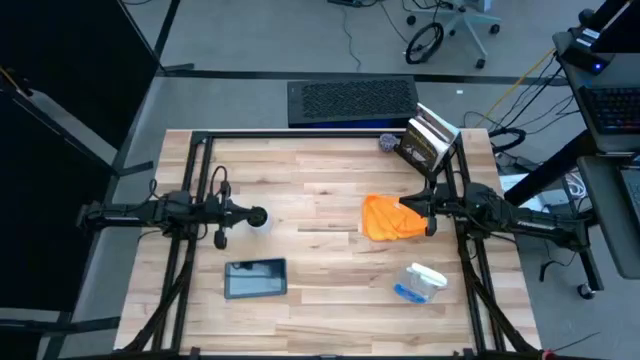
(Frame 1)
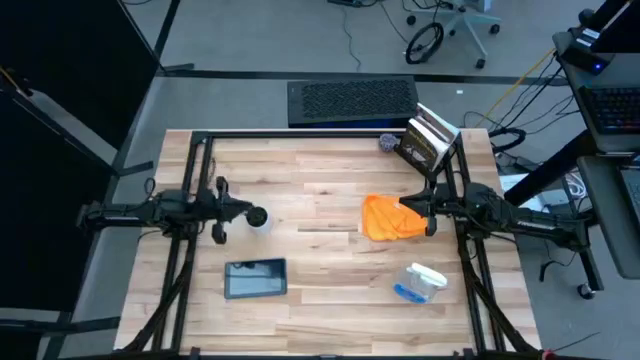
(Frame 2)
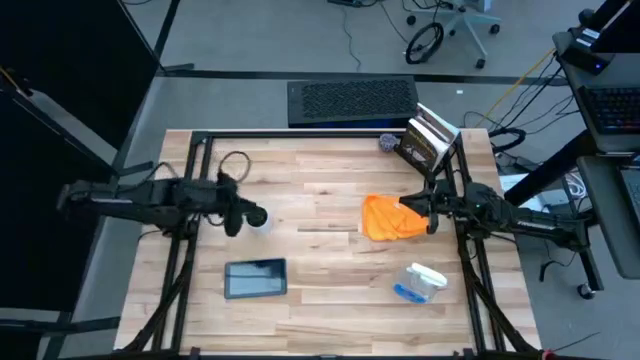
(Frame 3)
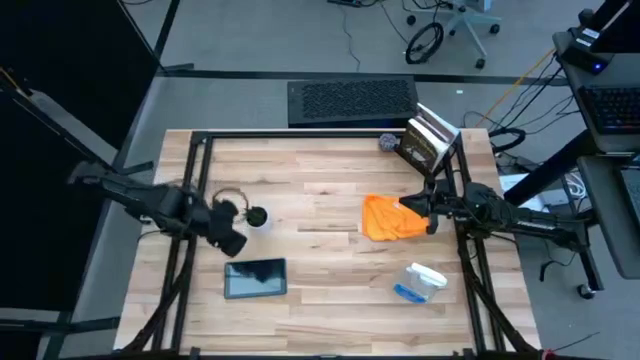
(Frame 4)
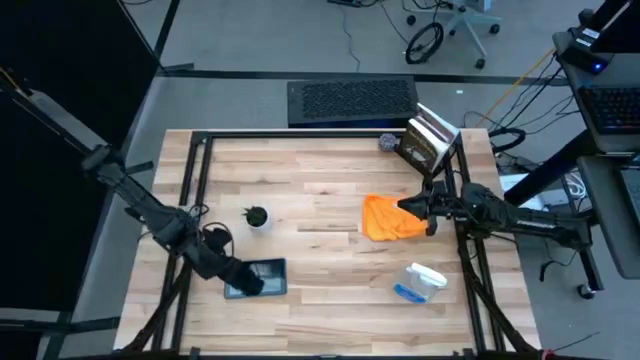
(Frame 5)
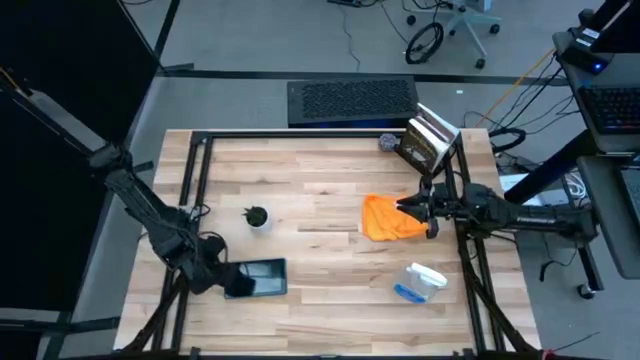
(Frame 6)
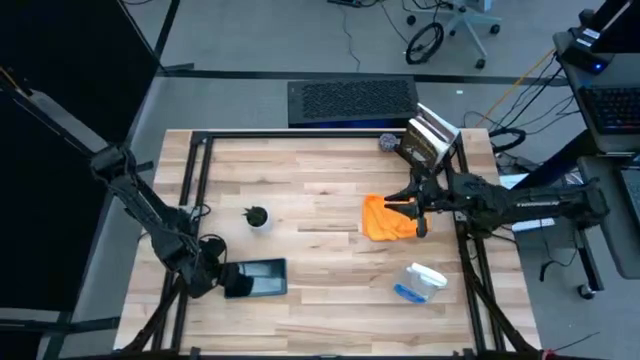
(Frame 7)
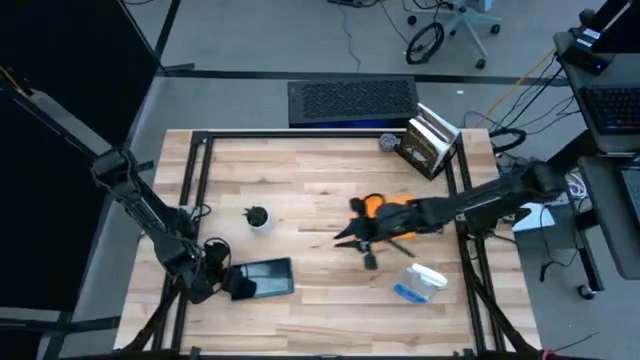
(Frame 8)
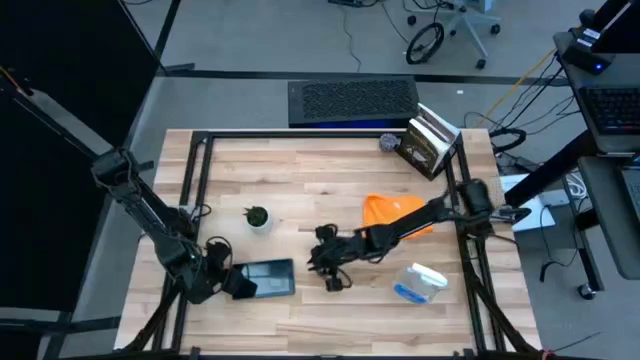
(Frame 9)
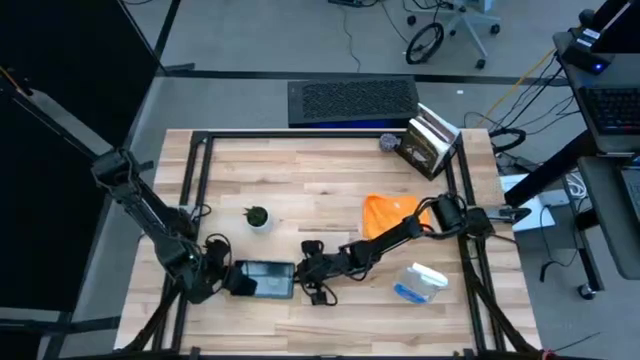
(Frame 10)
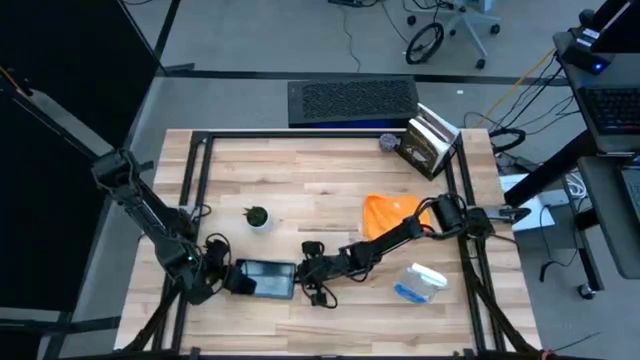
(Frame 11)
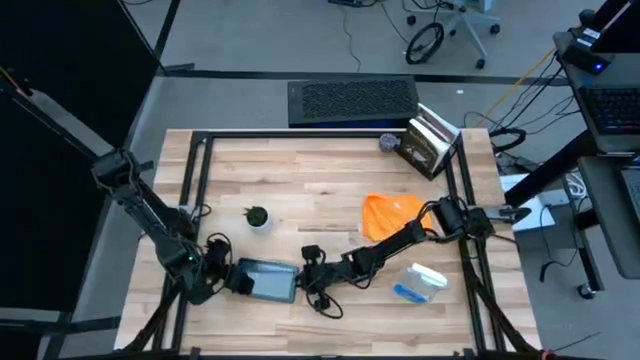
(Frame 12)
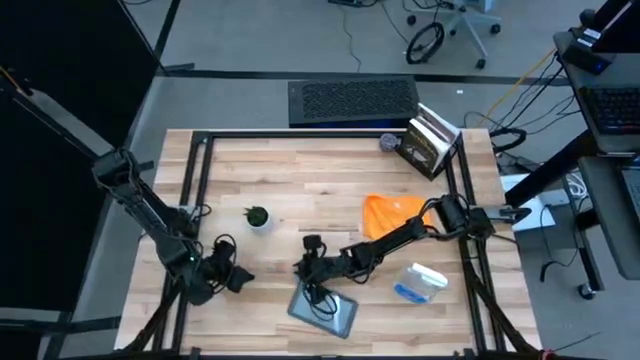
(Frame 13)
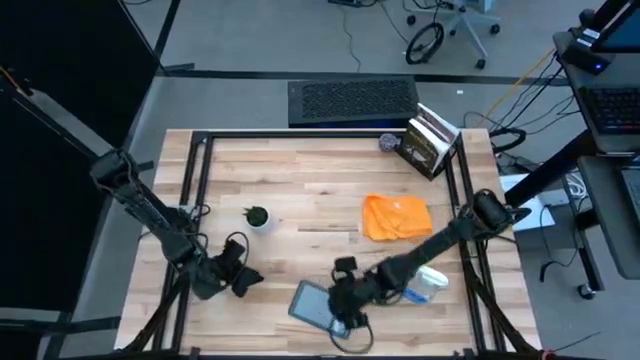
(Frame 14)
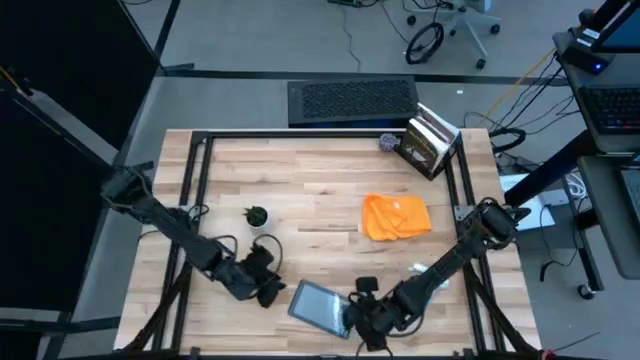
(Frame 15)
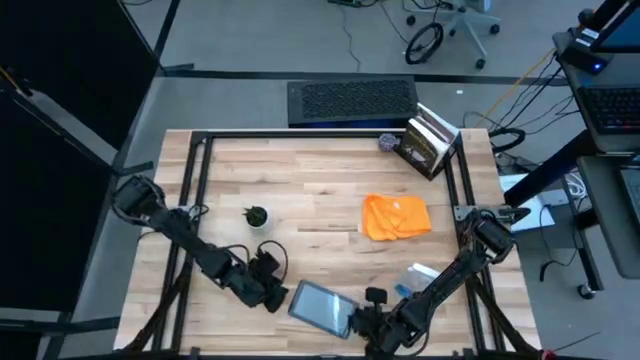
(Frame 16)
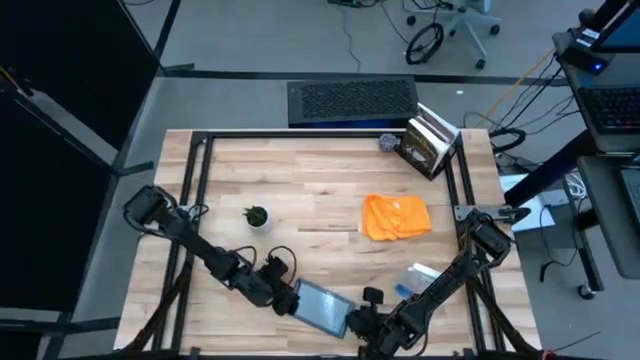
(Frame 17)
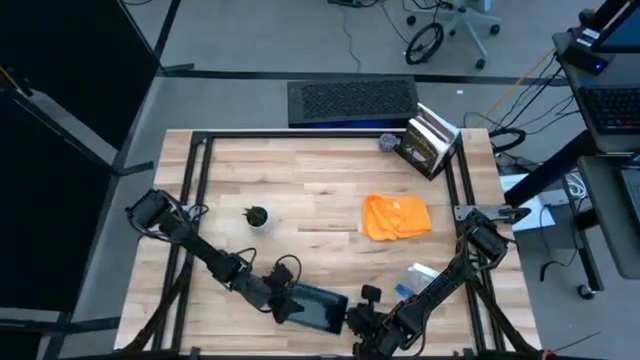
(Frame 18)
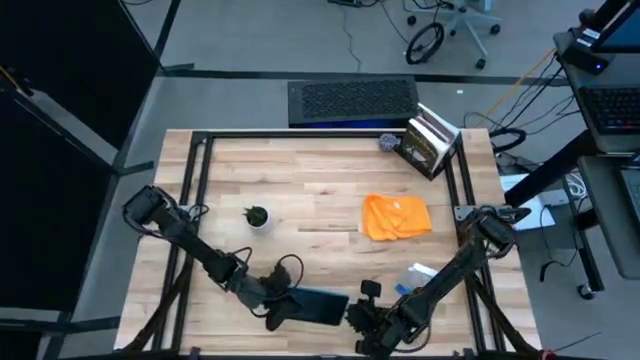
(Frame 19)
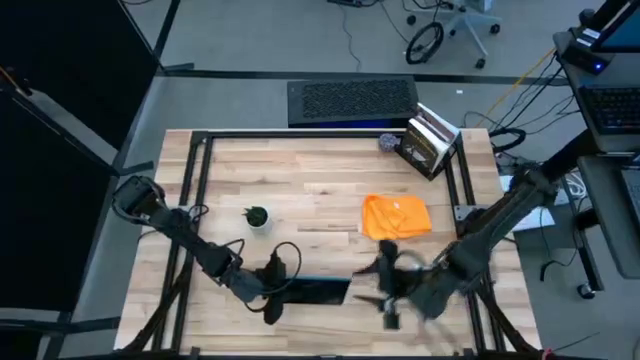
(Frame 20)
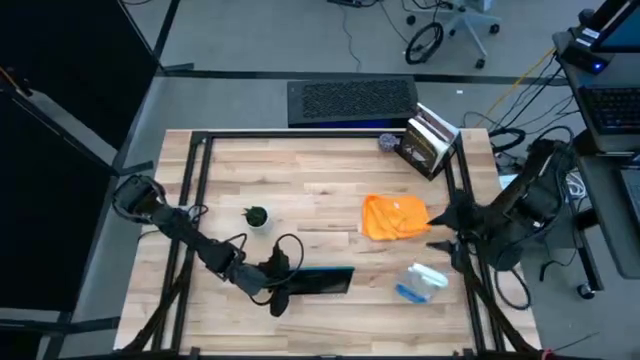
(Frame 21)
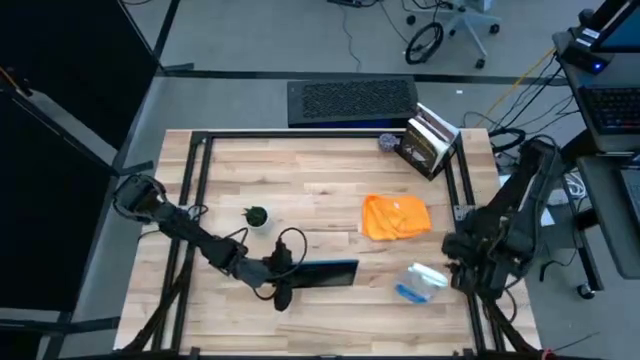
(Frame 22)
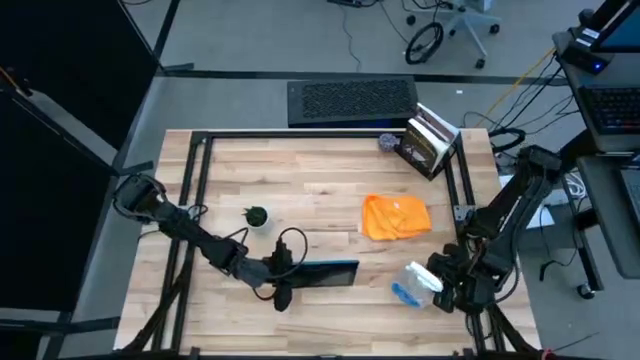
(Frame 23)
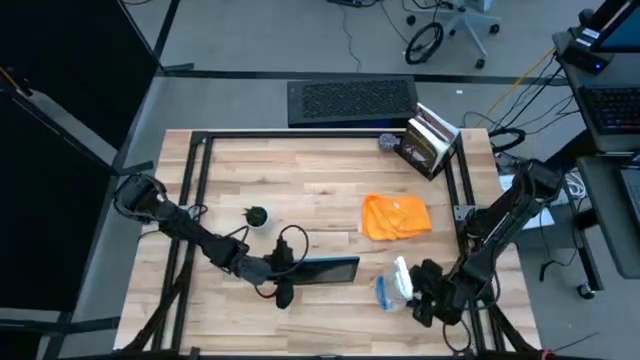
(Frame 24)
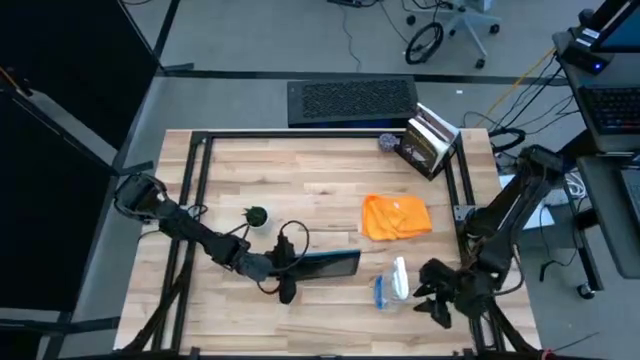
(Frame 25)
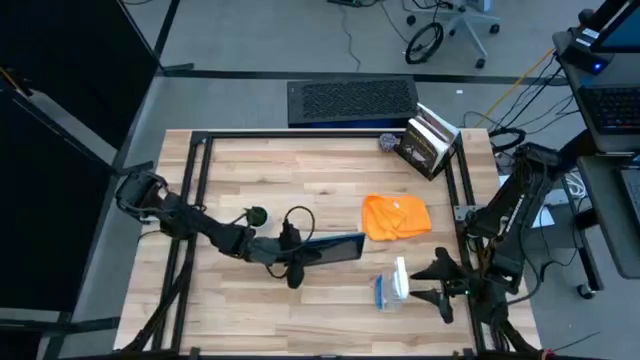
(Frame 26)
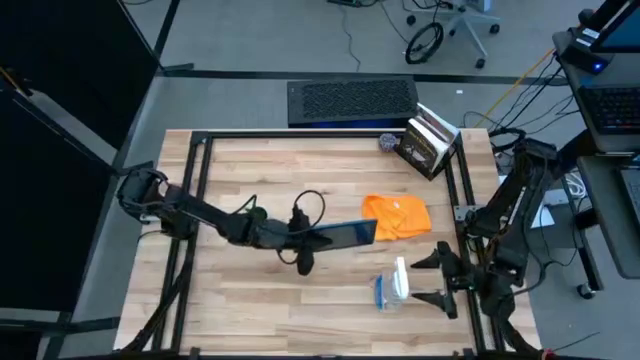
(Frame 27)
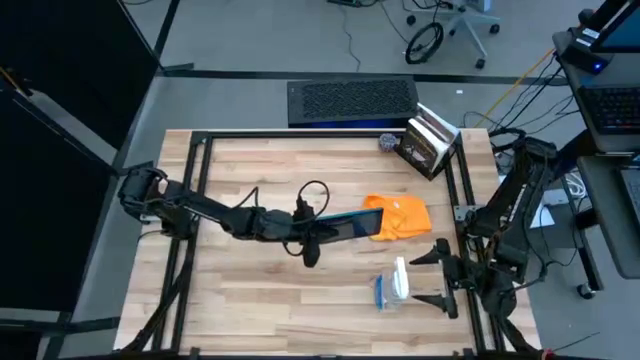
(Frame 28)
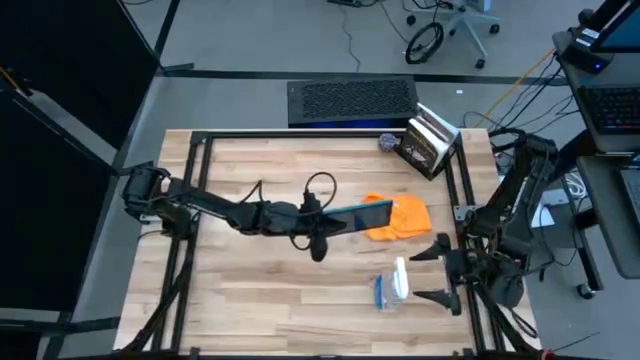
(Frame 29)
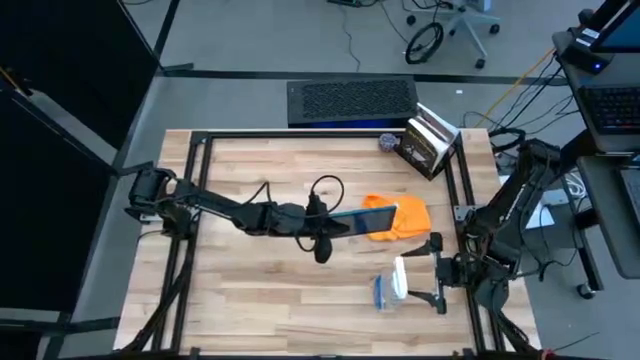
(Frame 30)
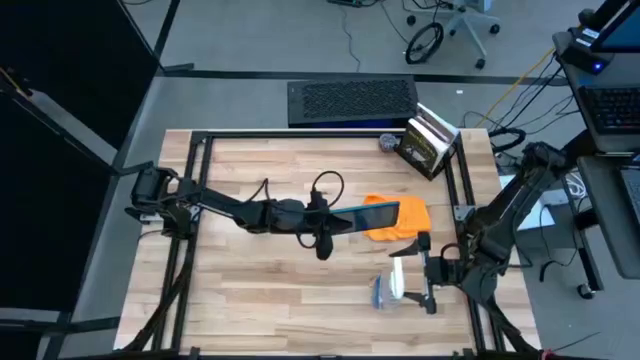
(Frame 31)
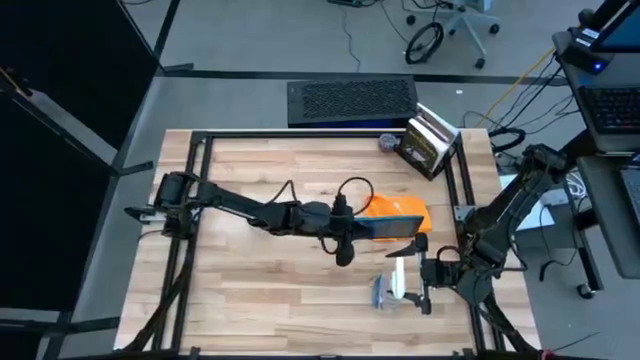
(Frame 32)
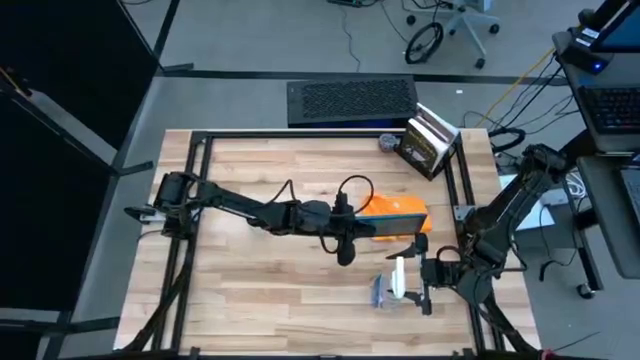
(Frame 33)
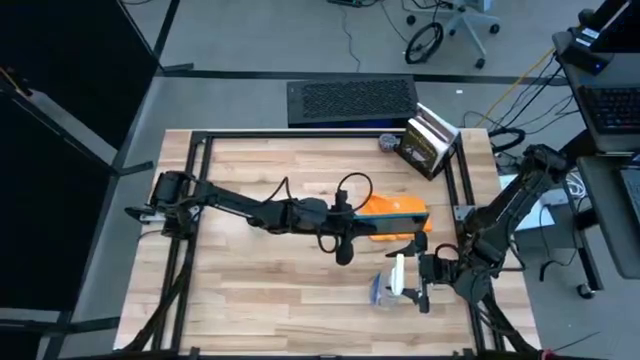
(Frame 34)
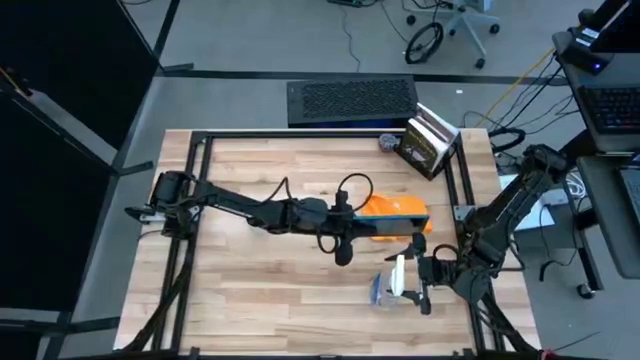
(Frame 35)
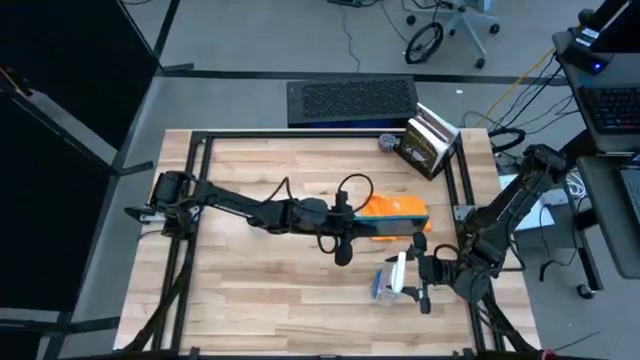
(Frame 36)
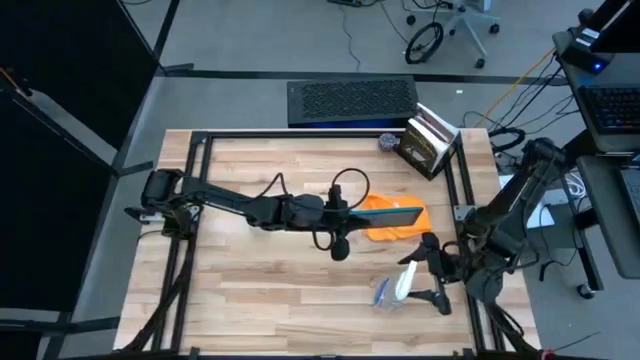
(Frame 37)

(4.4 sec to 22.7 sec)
Task: Apply microfiber cloth
Spray the blue tablet with the transparent spray bottle

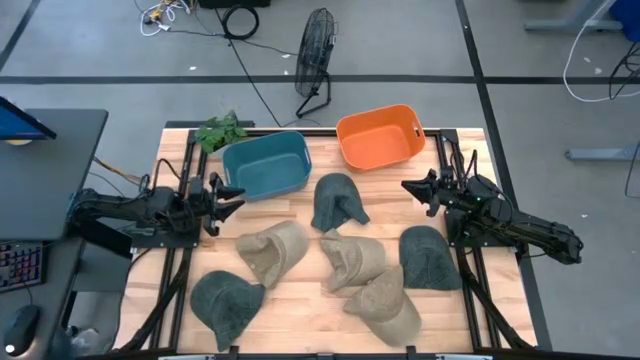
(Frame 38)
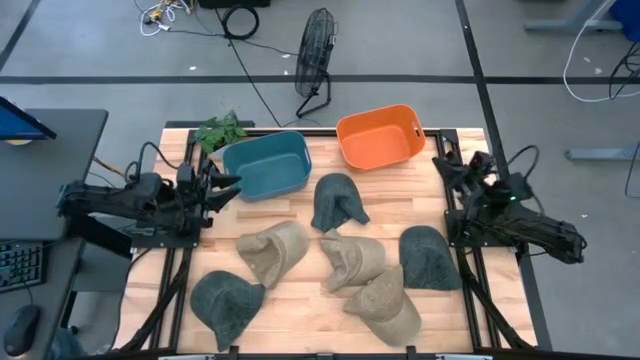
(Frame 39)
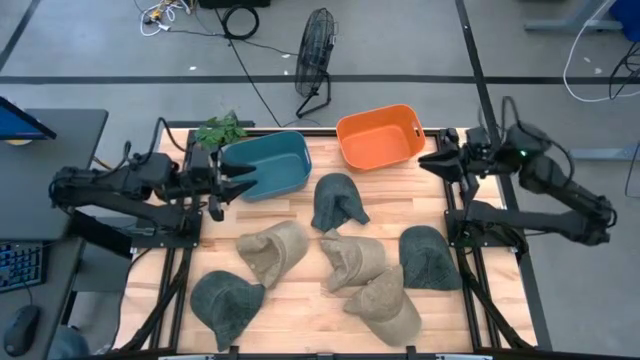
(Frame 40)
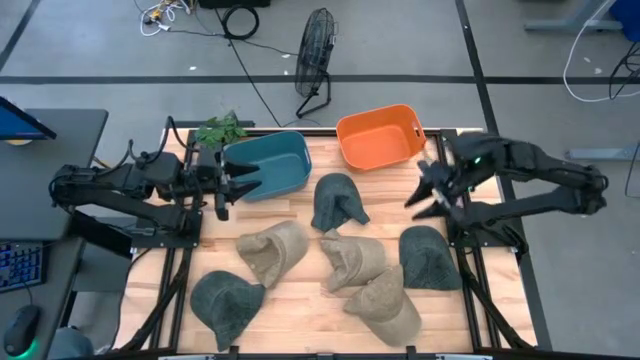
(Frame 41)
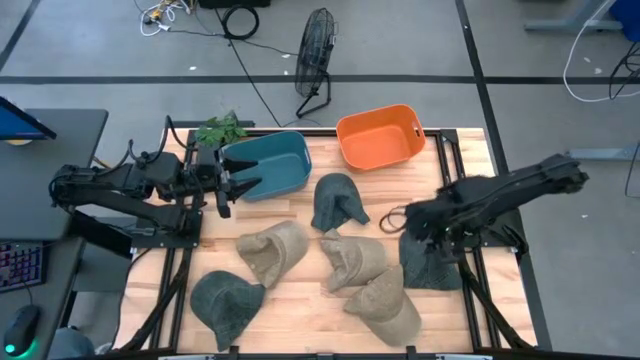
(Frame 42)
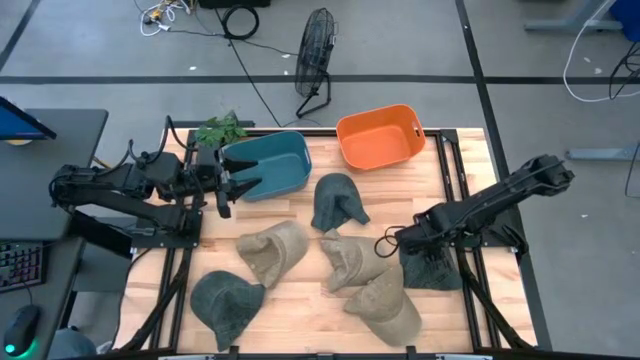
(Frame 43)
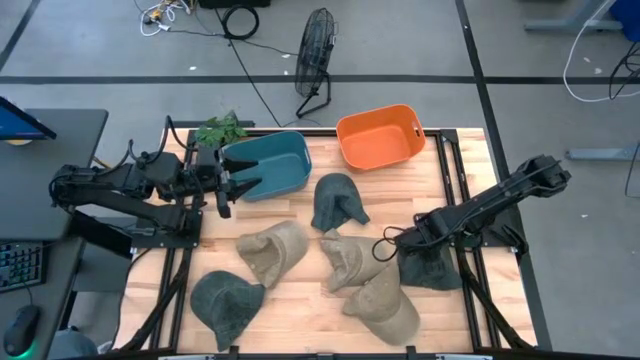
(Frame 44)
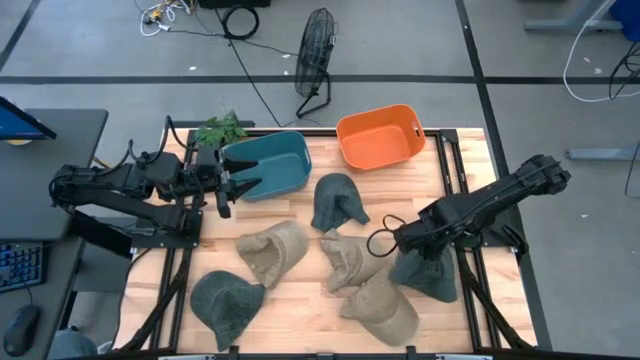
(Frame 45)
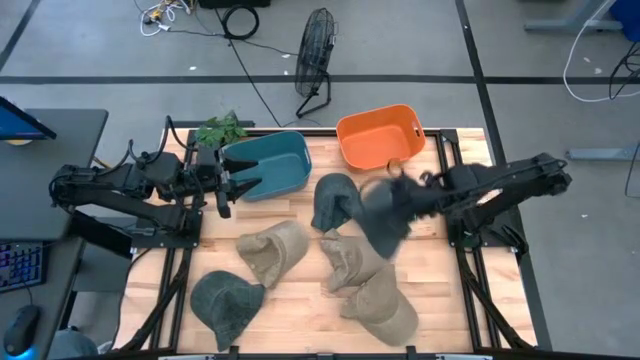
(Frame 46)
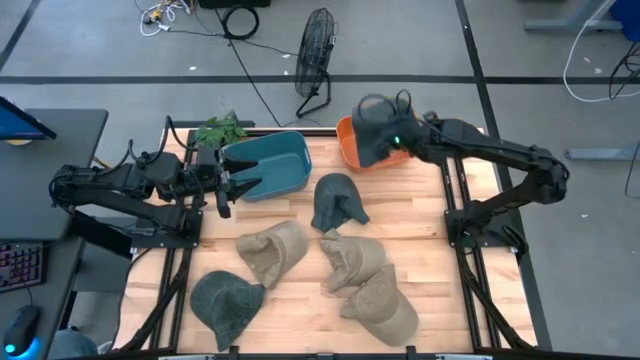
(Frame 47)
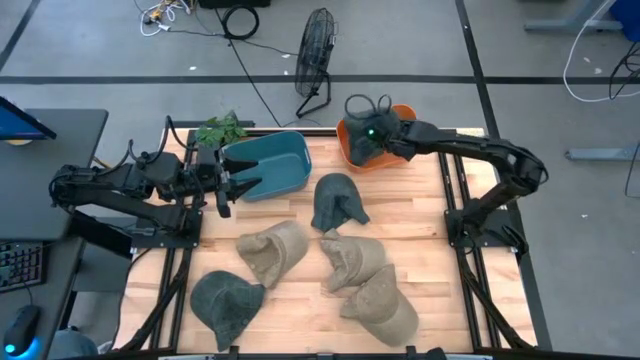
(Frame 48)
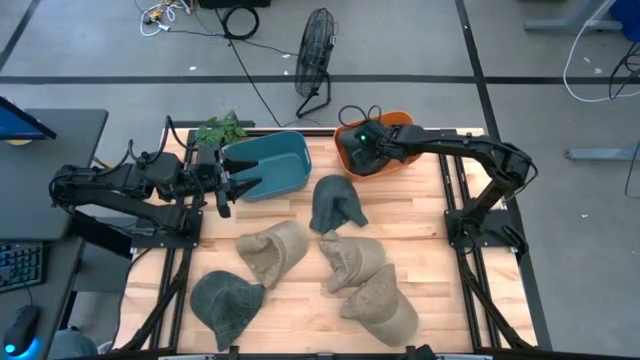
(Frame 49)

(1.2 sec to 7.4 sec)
Task: Pick & Place hat
Put the bottom right black cap into the orange bin
